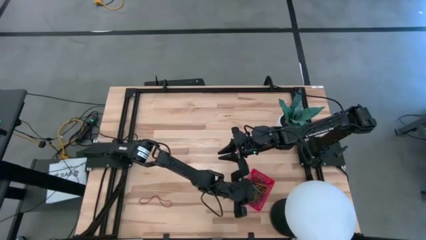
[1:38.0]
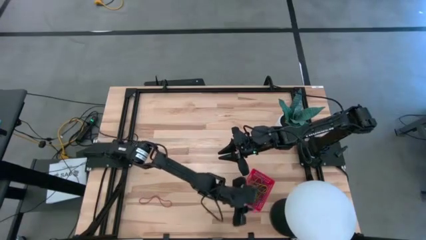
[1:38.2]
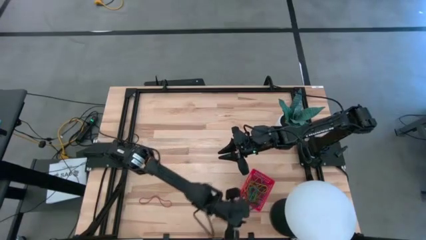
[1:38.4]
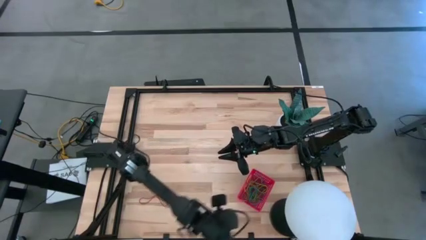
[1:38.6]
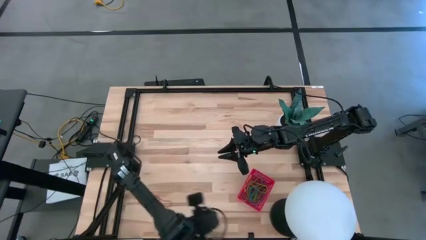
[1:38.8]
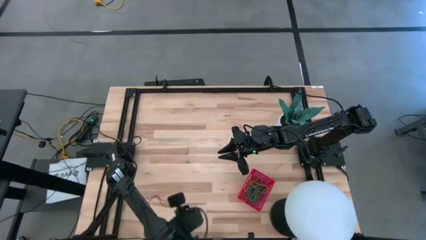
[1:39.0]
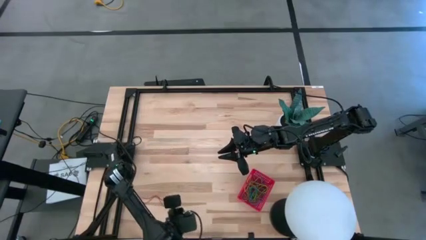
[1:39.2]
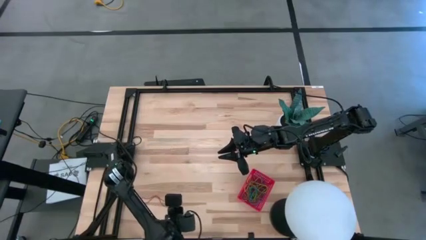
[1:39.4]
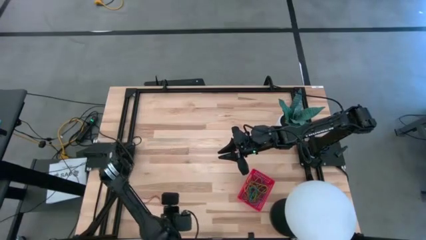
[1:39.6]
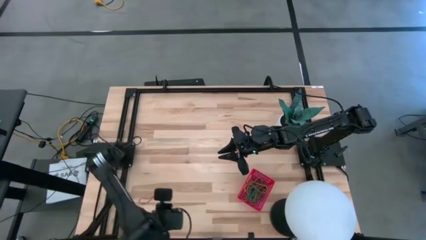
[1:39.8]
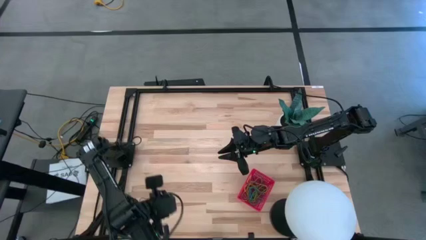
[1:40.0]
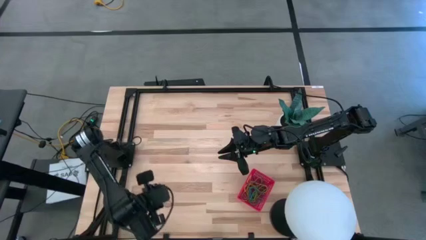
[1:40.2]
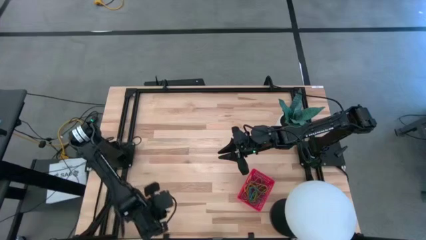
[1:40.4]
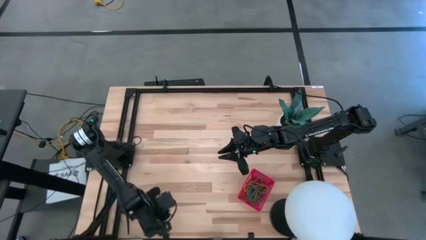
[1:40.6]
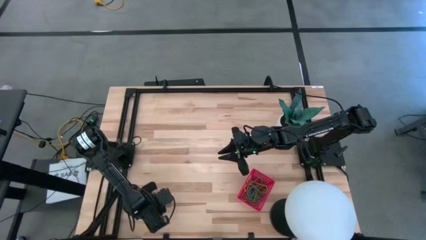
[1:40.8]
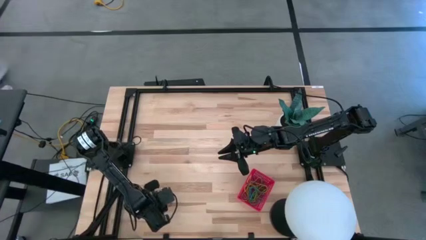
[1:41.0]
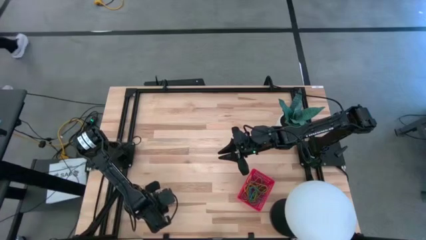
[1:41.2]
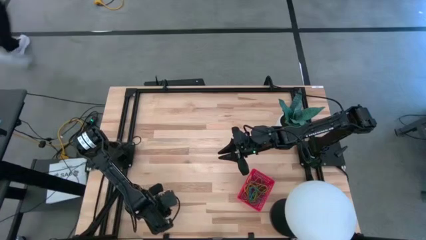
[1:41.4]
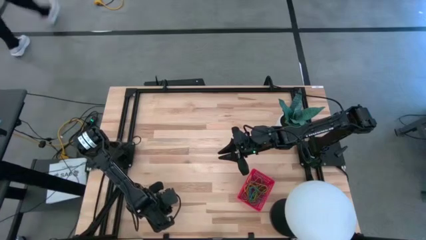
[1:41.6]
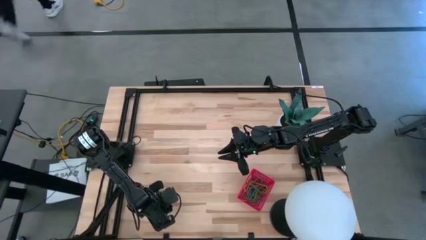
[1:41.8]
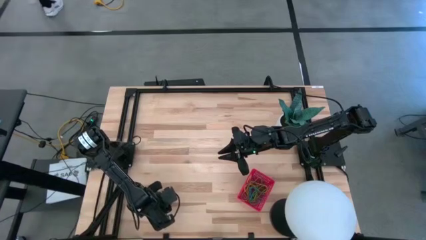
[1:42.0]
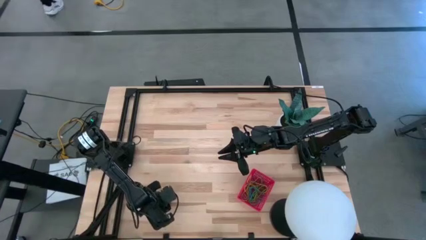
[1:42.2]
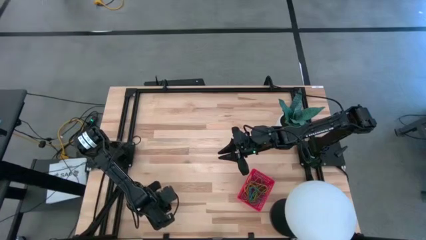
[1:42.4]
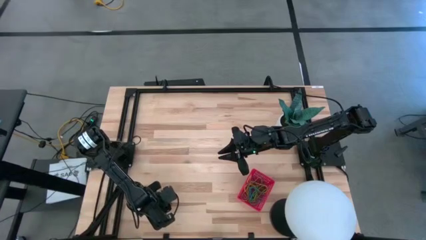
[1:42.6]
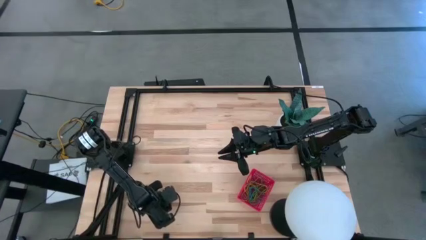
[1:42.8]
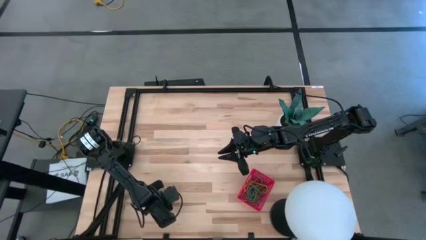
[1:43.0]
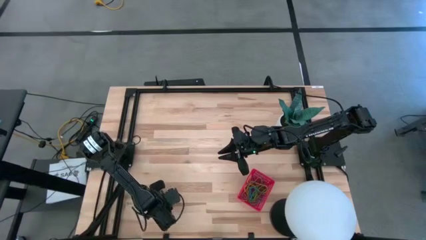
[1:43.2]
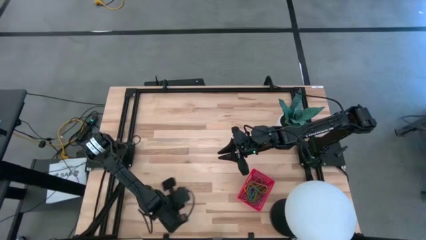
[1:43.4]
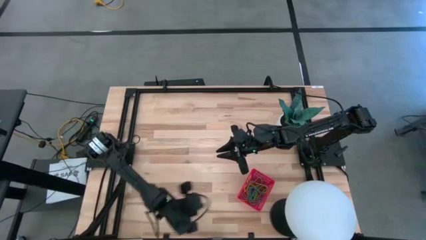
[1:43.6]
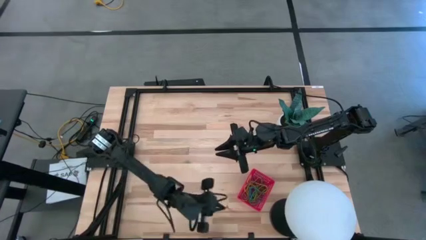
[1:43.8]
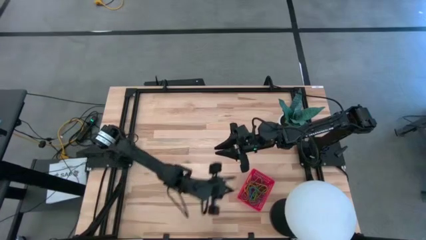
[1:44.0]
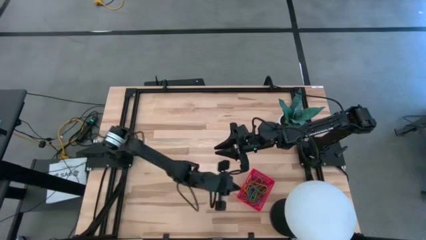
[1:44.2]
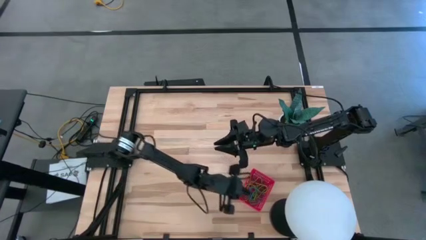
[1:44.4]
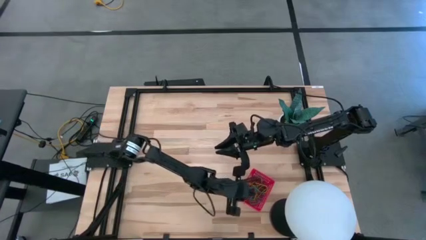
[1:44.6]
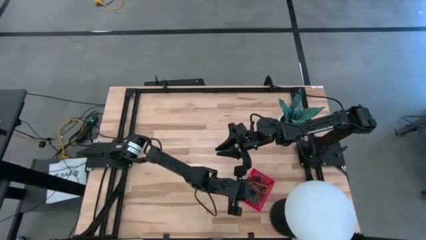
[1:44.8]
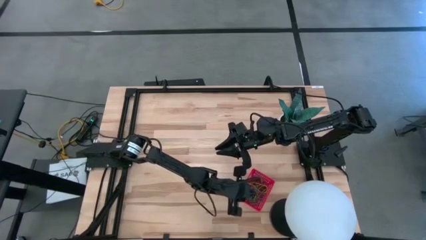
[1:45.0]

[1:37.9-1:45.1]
Task: Pick and place items into bin
Put the red rubber band into the red bin

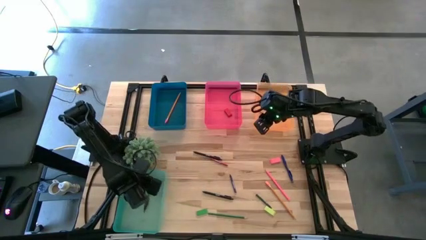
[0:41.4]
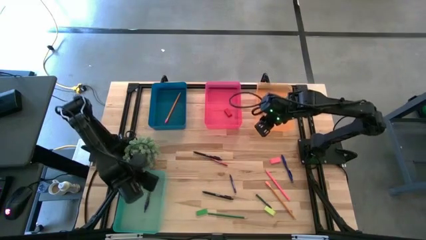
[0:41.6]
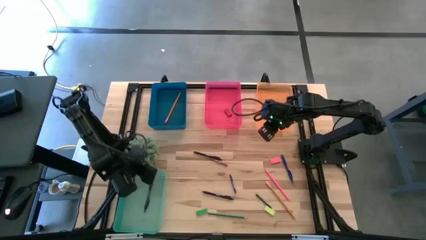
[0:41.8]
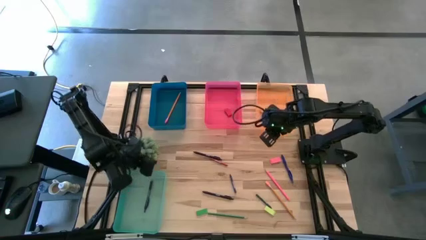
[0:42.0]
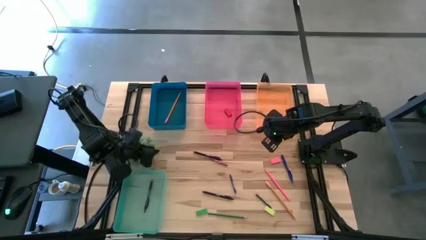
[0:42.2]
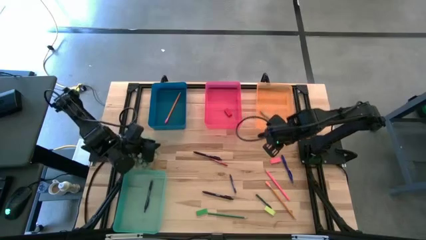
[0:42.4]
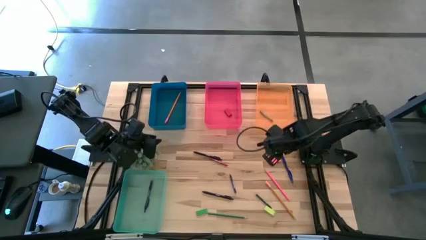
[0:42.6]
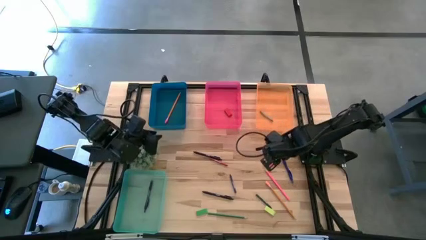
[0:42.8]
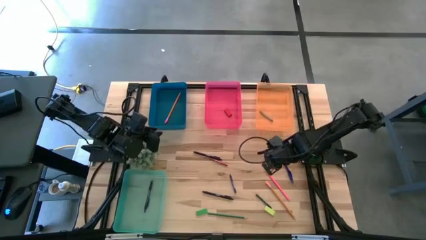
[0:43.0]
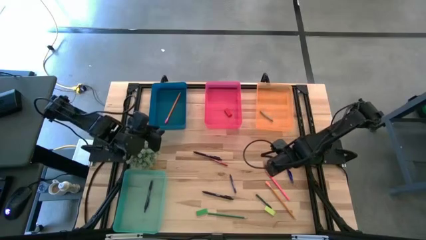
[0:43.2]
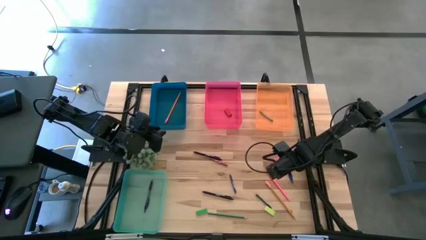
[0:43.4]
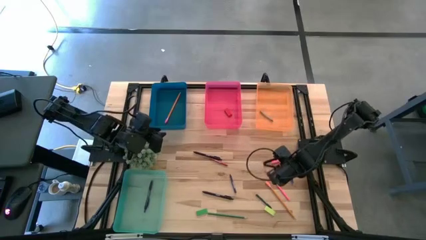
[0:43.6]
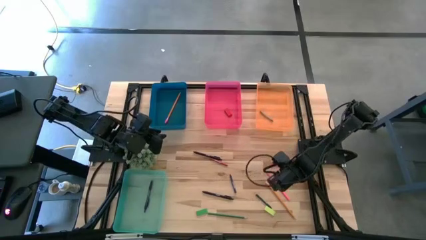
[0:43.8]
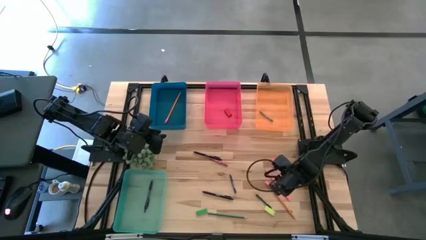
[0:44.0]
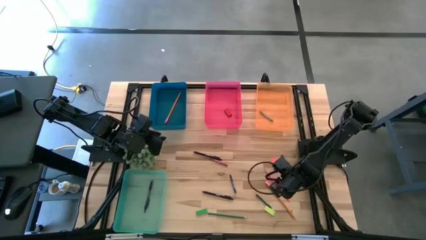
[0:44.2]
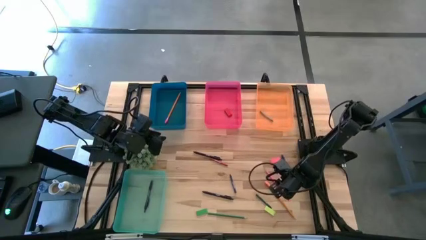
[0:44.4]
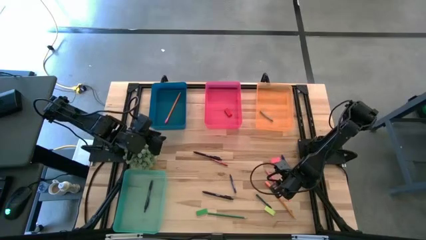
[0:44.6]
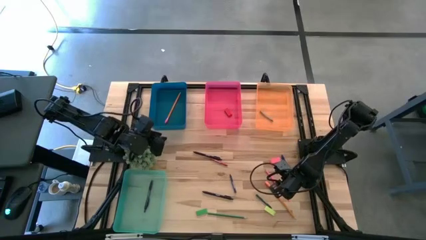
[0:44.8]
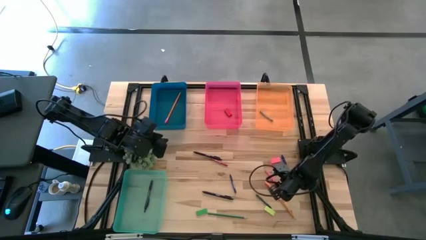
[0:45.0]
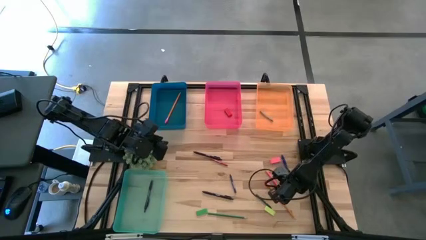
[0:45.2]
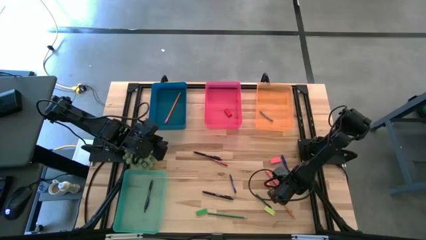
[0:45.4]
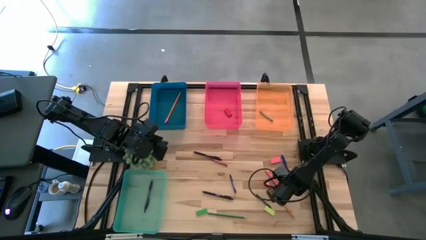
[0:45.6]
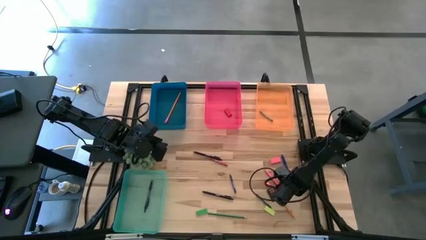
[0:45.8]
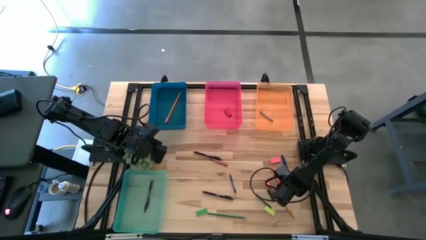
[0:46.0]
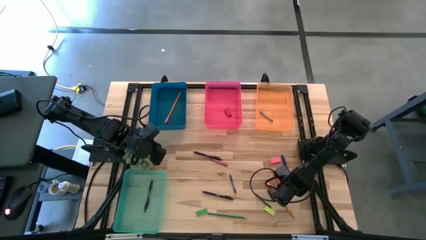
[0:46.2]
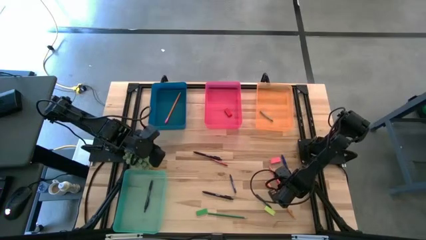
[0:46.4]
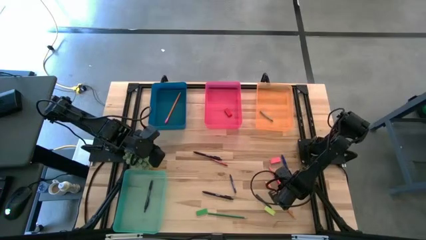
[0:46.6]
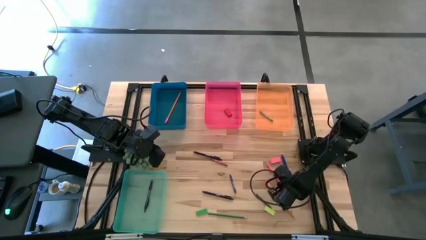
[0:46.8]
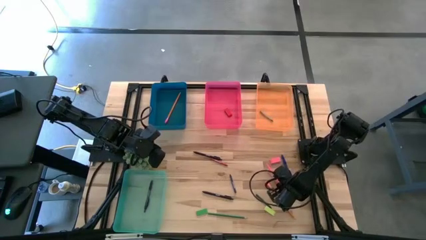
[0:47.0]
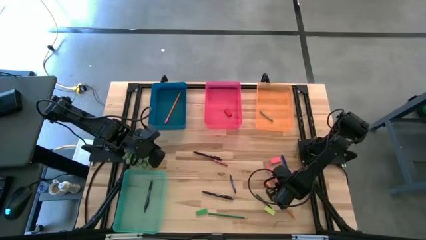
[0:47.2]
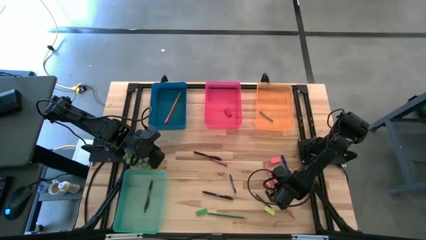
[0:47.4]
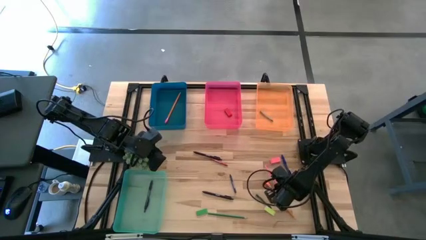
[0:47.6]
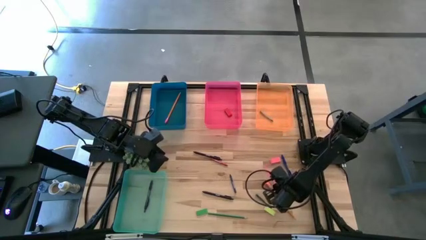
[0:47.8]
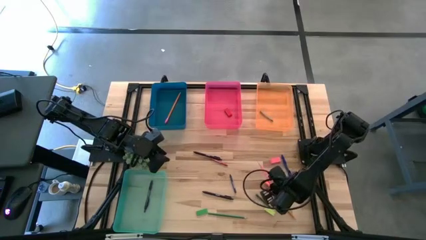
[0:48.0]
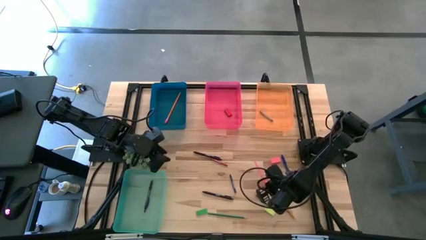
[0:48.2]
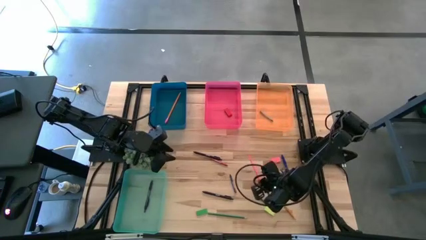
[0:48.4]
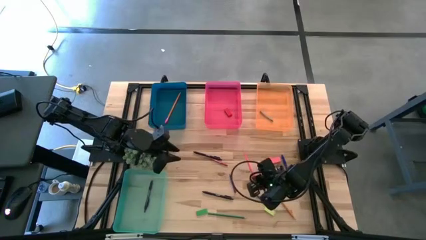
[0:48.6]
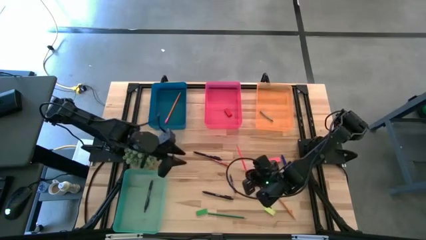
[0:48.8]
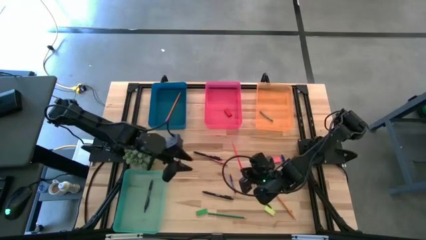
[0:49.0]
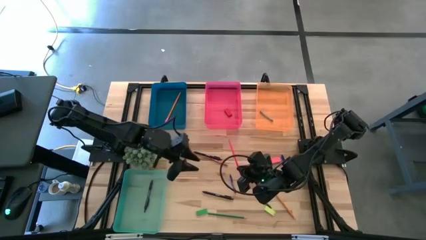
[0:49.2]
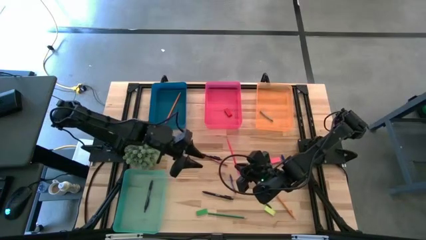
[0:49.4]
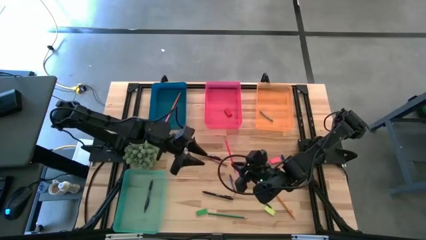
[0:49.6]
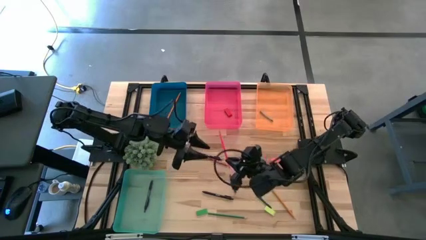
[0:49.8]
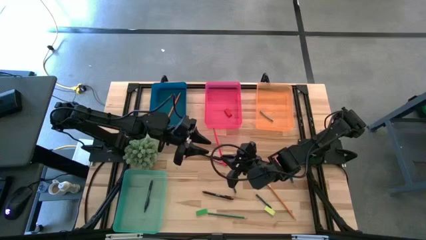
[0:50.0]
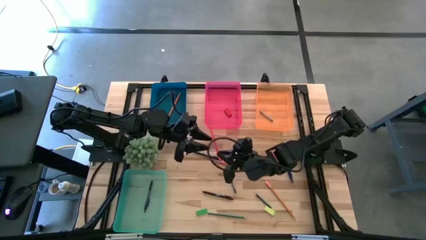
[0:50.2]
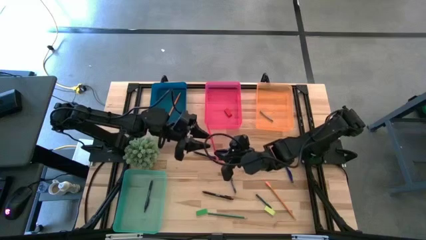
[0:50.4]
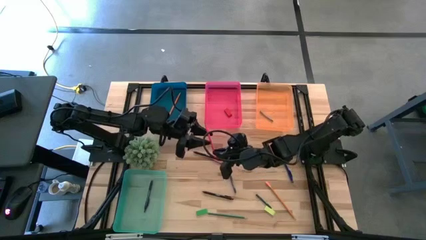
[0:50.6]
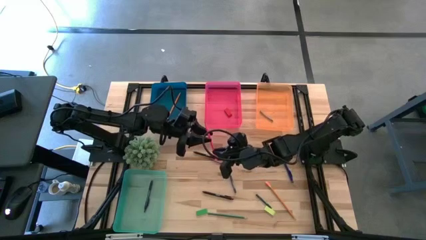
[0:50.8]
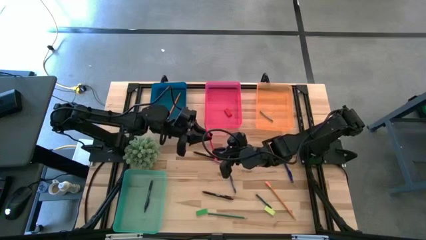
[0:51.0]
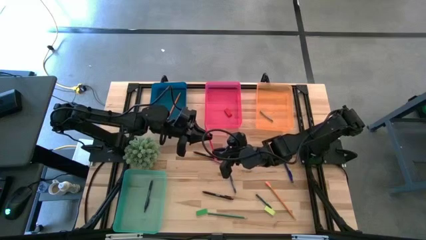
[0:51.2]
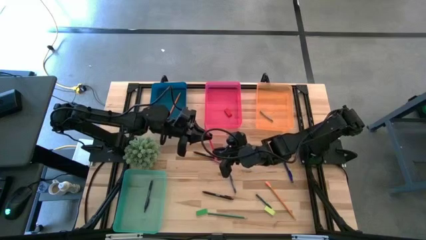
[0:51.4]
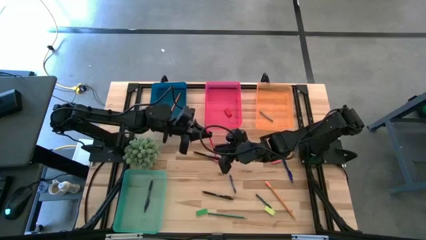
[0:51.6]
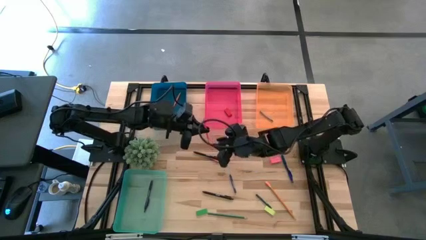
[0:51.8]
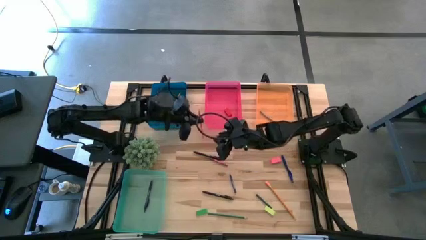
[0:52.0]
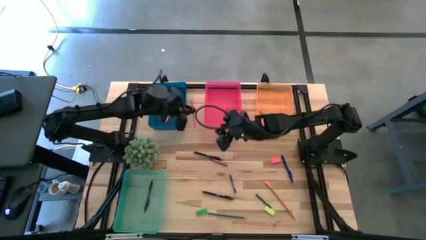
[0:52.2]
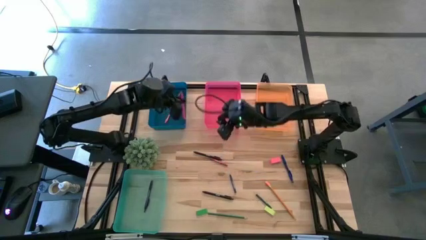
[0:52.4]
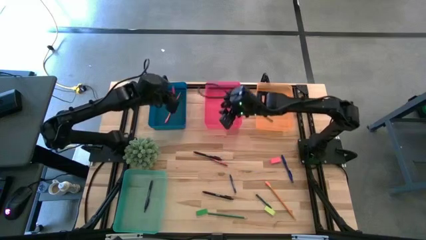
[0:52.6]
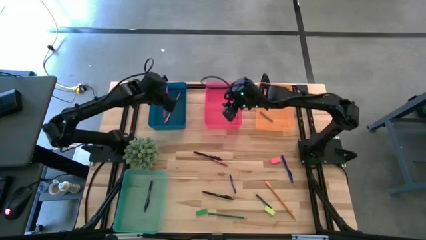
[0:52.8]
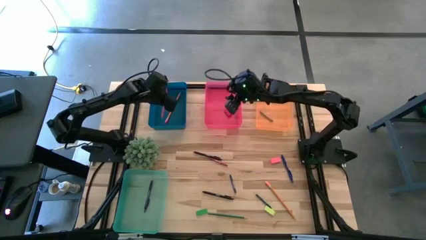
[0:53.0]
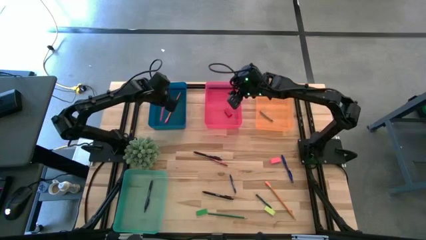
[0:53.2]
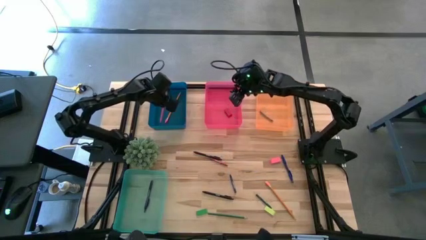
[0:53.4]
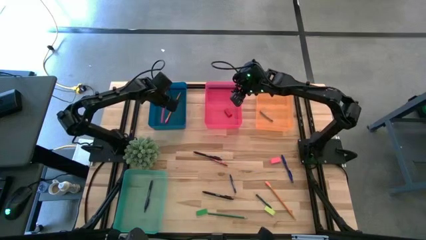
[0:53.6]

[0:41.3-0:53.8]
Task: Sort crayons/erasers/pens/pencils in bins
Put the pink pencil into the blue bin
